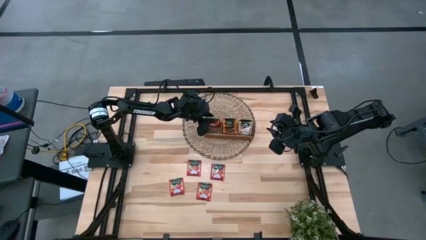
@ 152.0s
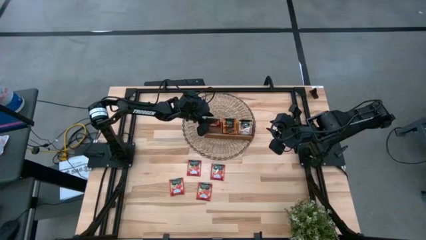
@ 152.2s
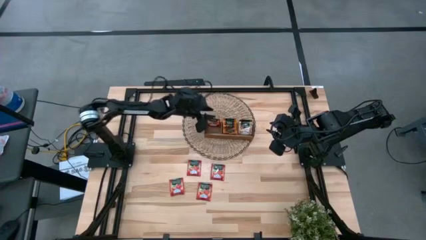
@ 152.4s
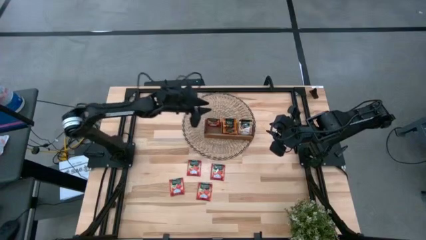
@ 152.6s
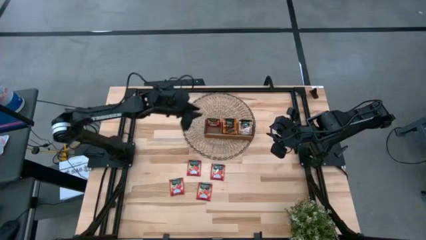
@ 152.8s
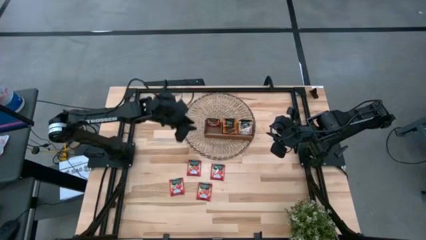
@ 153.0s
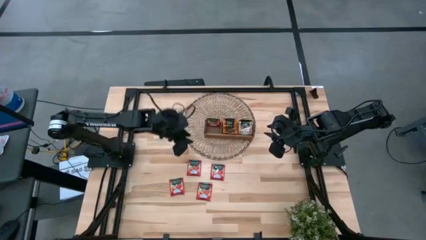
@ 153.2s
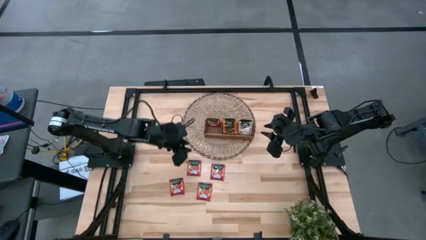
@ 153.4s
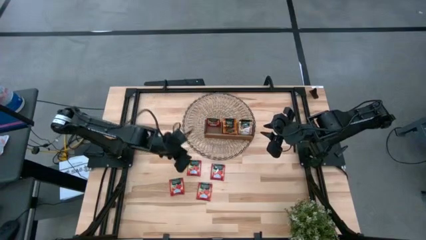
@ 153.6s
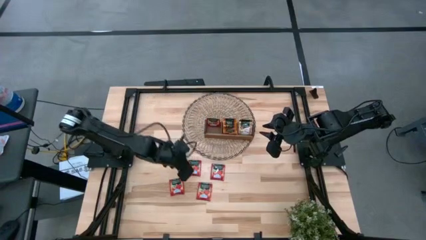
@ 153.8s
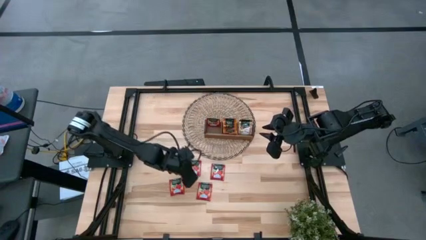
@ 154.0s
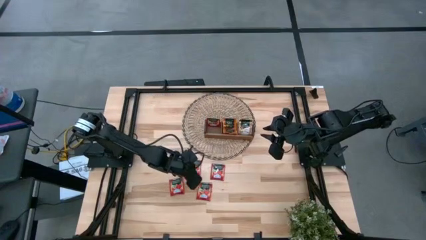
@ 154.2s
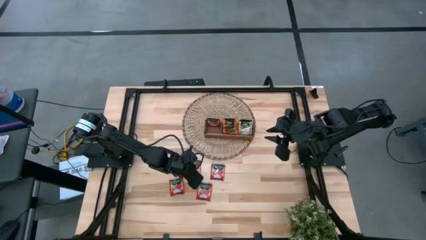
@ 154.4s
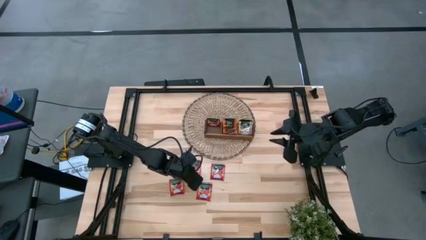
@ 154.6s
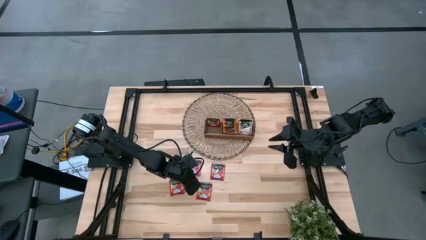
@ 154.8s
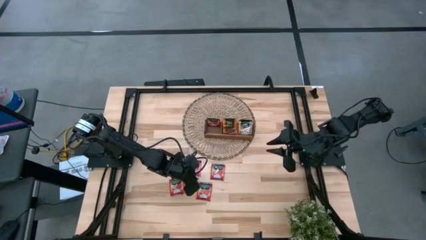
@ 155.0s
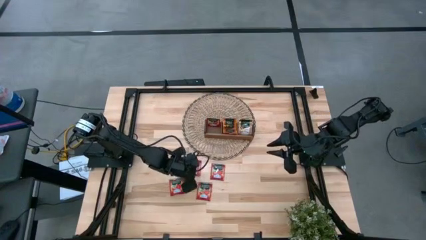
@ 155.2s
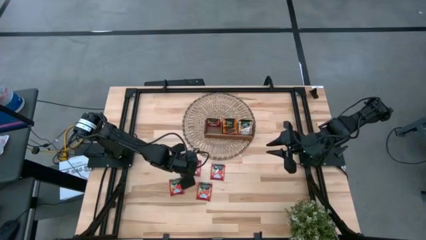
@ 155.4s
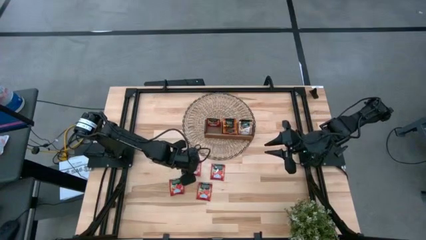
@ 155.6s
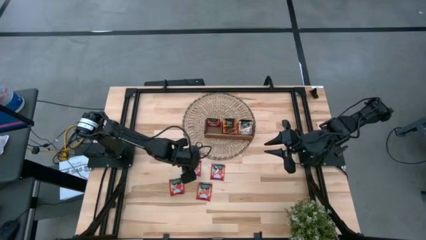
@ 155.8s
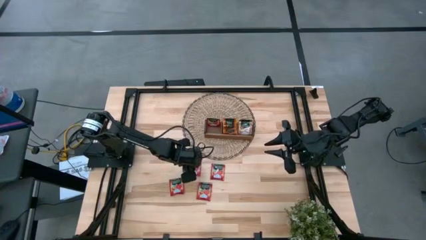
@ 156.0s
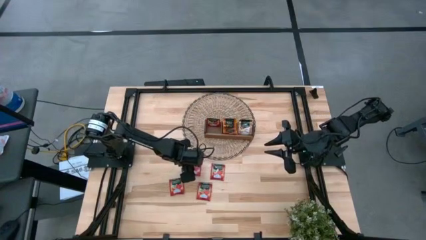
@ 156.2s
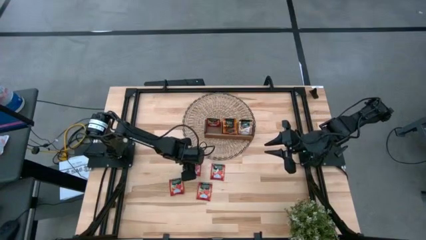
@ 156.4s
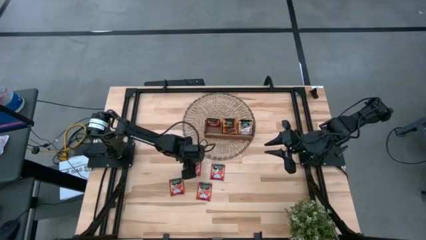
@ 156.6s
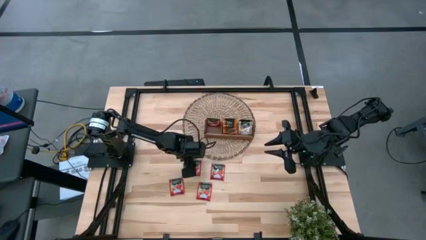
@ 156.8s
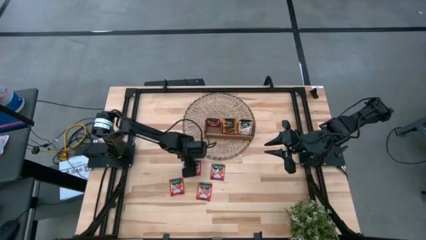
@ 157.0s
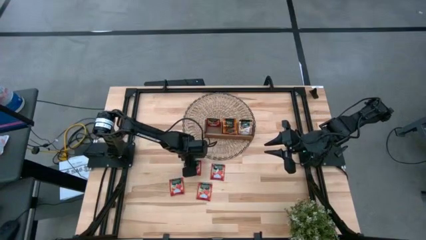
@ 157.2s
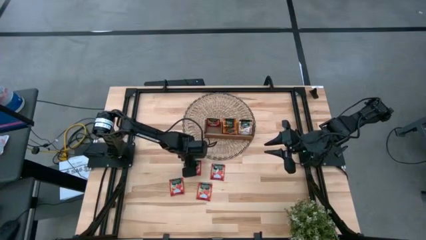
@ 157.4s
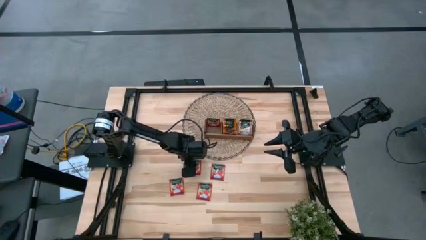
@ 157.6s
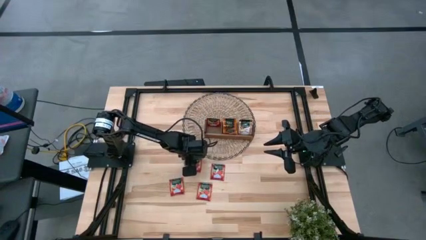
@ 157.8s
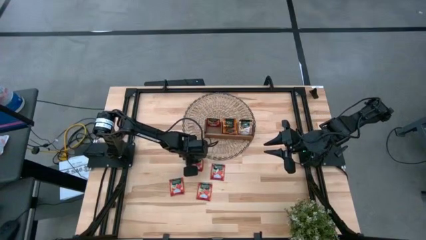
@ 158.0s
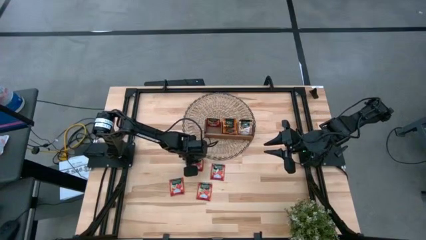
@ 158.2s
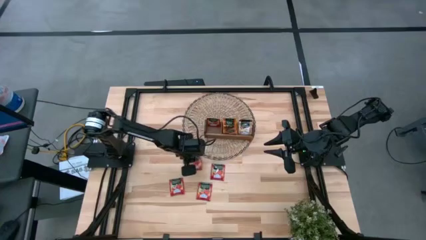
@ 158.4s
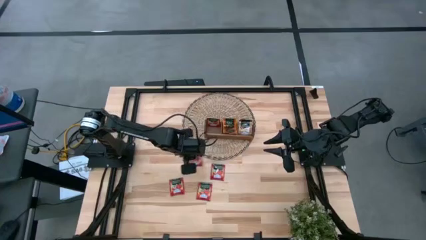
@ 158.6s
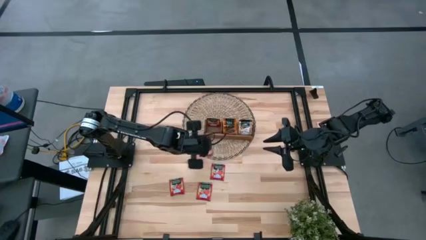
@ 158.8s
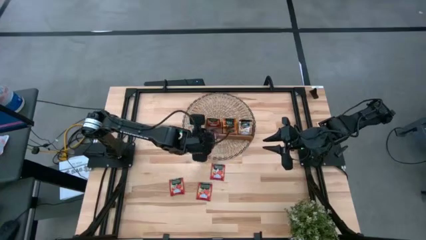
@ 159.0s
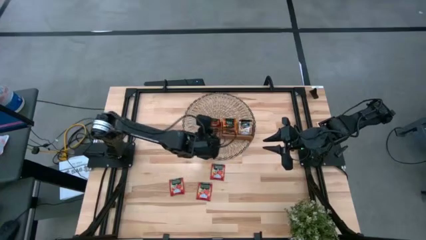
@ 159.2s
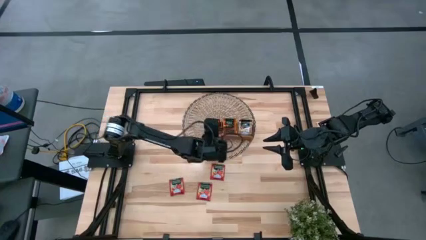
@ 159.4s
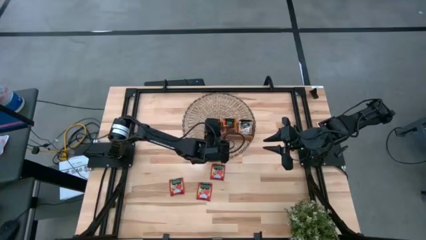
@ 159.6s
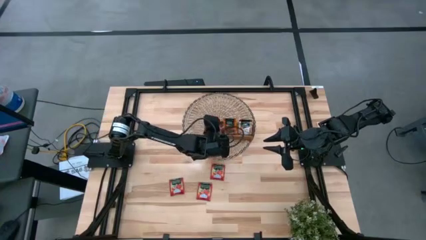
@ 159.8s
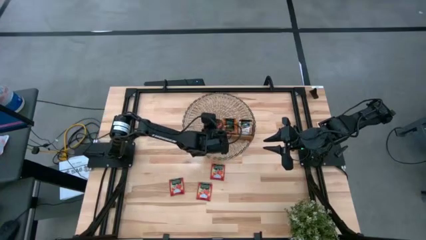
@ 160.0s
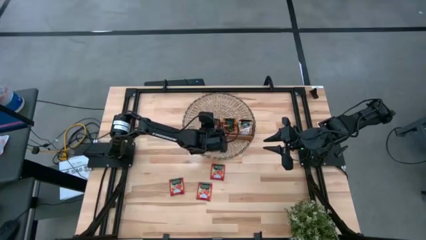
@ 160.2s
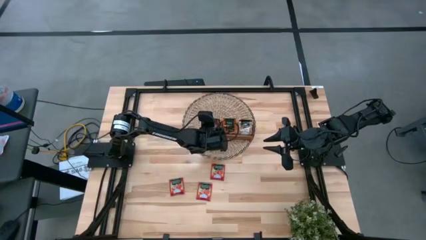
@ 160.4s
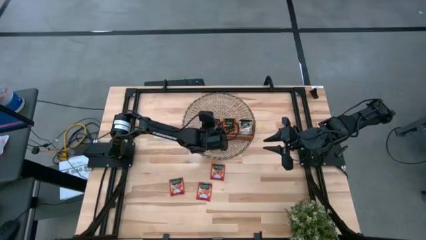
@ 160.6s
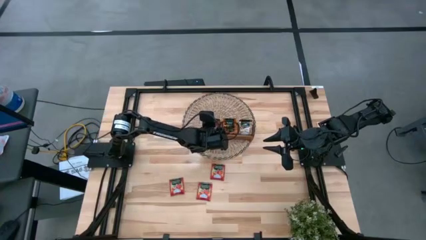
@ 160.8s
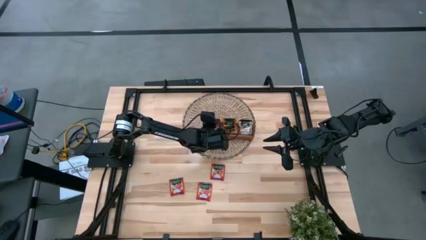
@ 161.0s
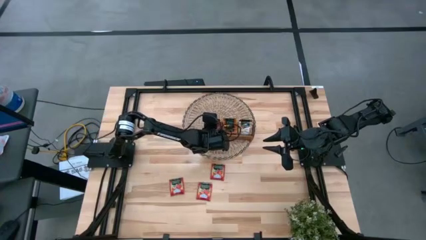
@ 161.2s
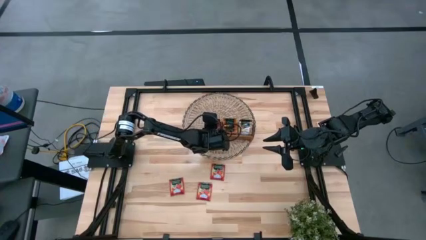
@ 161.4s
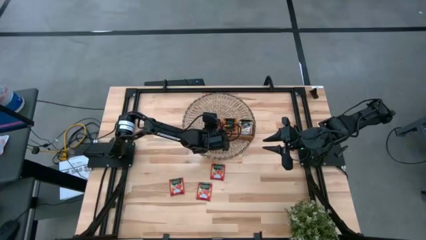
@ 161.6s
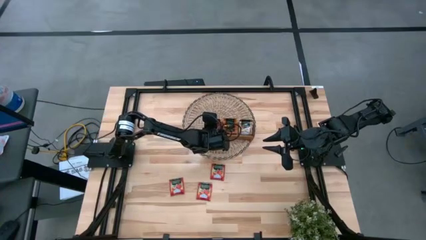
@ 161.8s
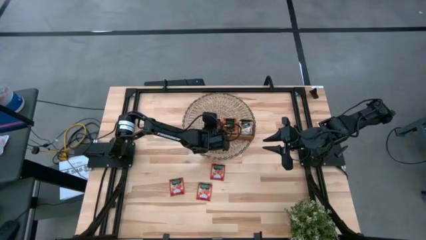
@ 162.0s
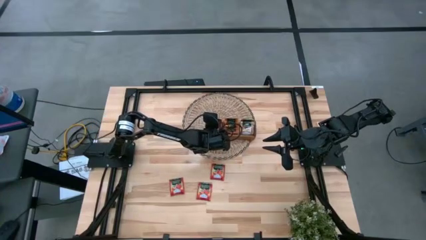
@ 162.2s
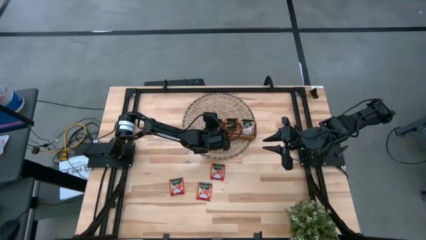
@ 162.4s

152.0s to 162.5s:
Task: Pick & Place Tea
Put the red tea bag into the left slot of the wooden organizer
